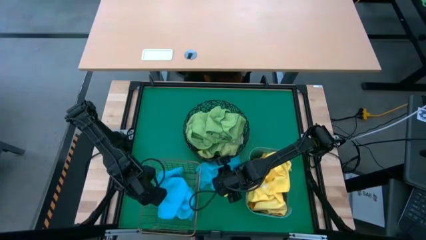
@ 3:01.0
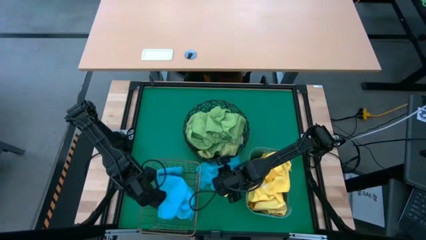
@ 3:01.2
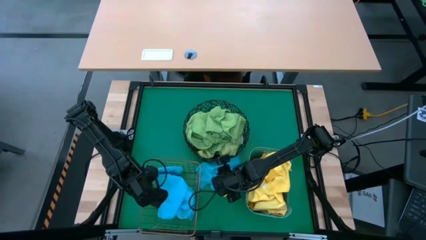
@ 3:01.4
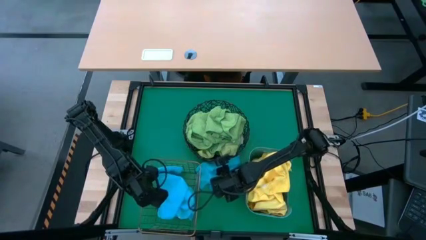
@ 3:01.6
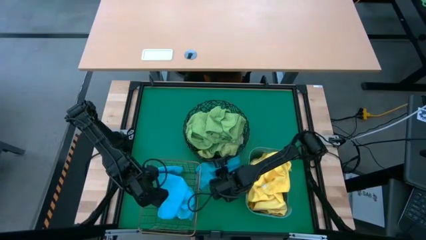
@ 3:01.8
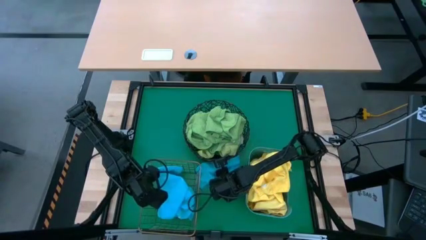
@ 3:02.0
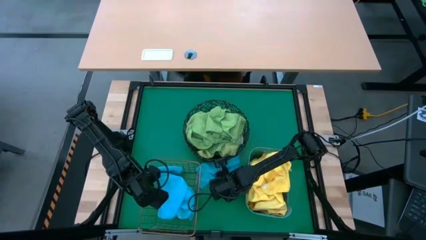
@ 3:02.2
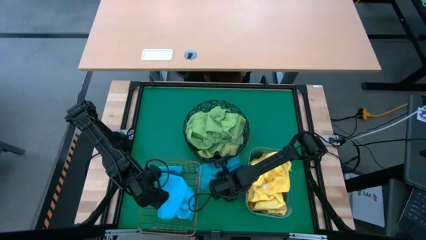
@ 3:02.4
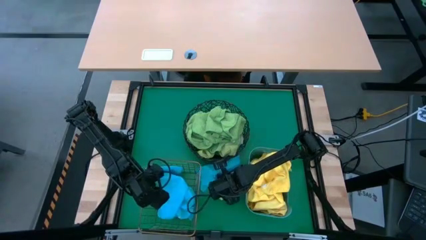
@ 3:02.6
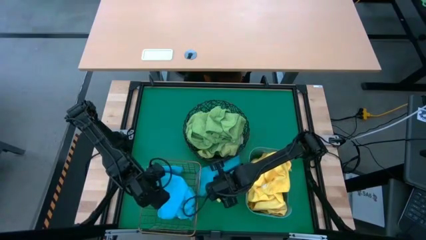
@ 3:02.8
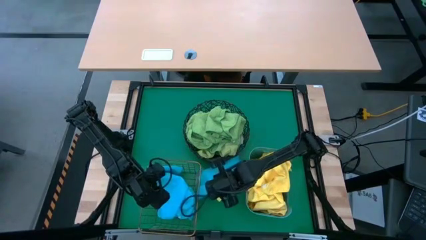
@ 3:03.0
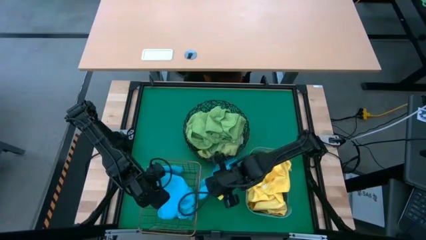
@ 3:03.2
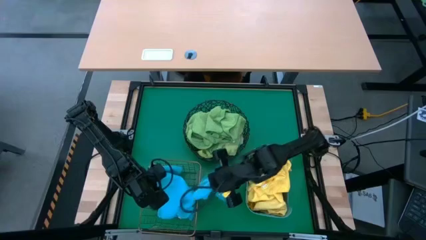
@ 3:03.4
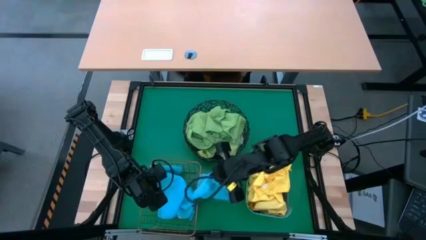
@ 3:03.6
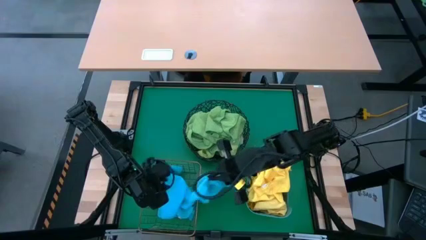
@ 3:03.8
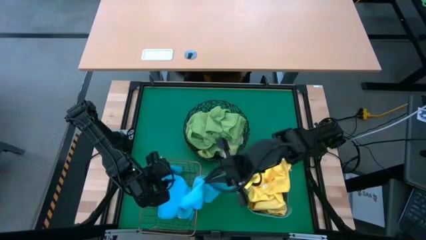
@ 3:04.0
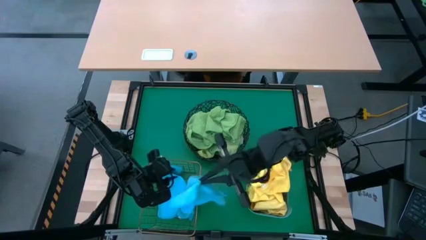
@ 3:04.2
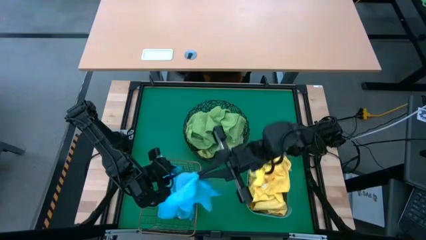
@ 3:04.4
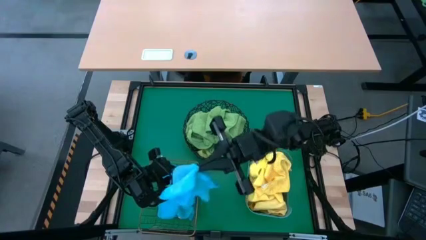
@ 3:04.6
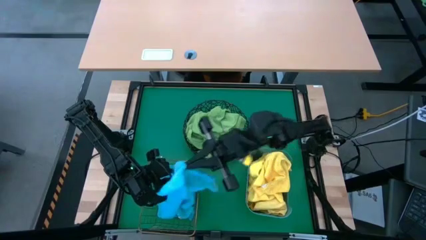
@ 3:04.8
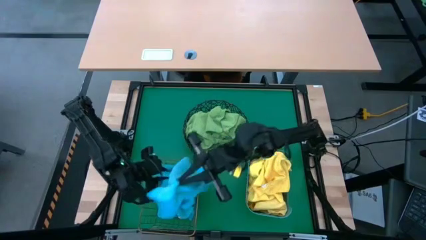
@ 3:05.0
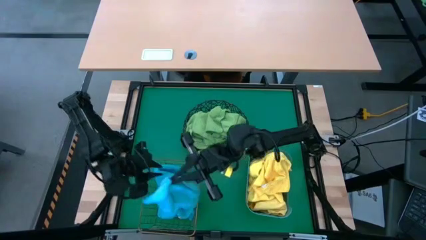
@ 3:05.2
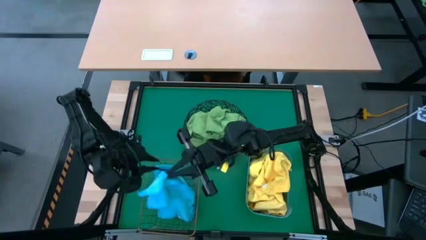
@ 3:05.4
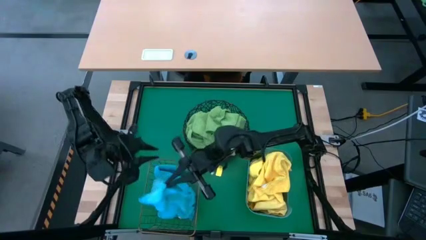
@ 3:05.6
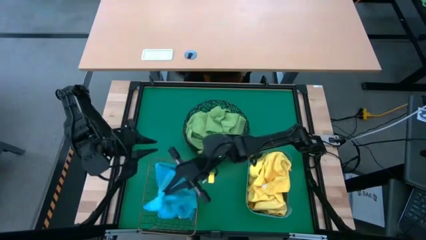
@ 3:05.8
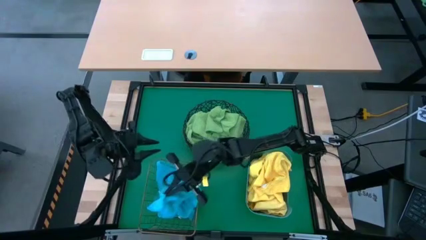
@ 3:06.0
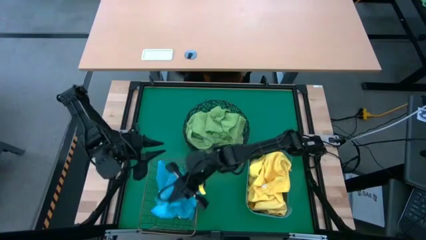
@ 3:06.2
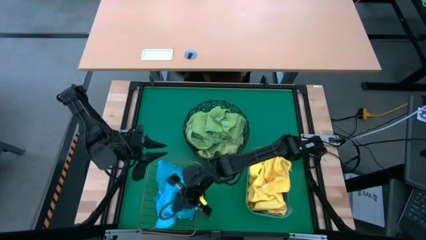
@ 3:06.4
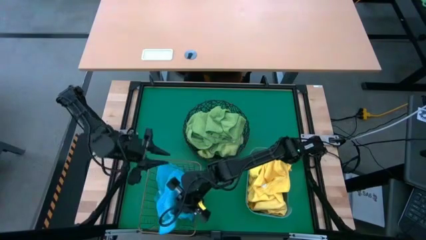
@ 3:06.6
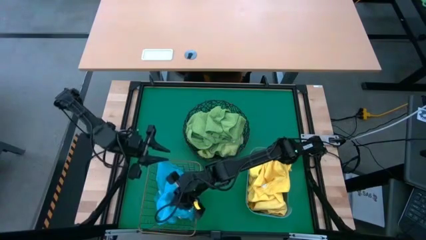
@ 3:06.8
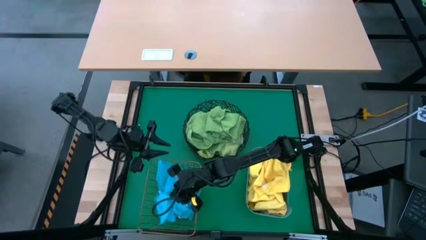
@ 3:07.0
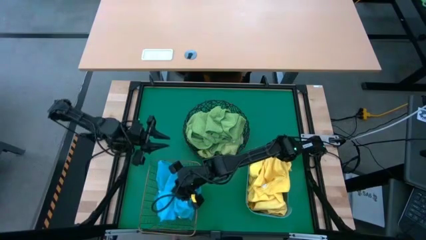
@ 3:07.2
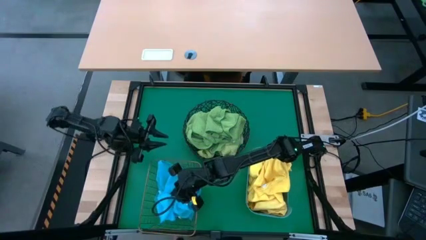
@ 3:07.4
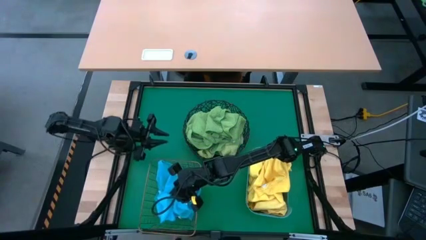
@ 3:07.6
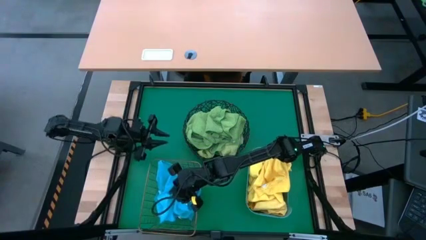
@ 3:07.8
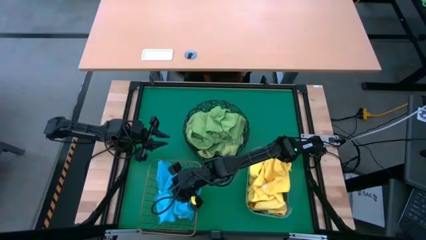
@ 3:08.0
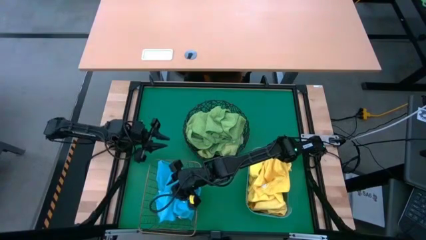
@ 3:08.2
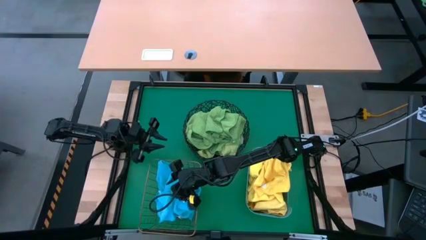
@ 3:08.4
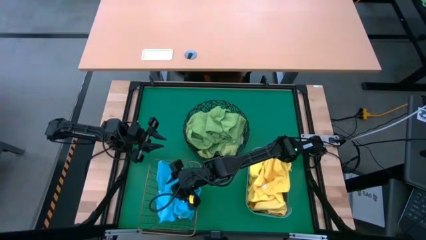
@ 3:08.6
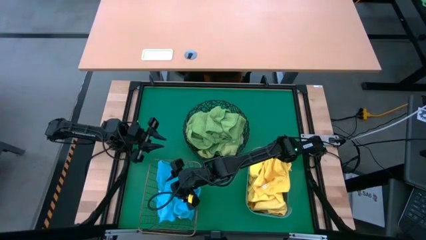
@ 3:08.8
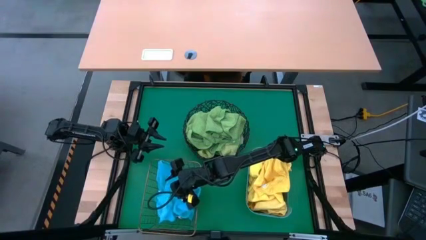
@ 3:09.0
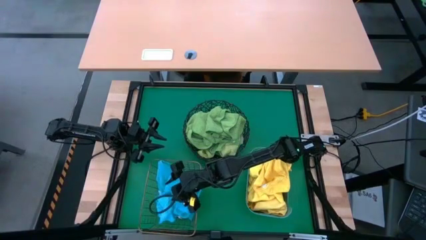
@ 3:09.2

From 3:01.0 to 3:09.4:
Task: Sort microfiber towel by color & place in baskets
Put the blue microfiber cloth into the wire basket

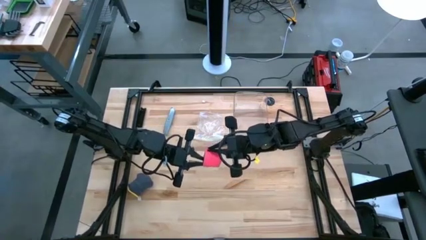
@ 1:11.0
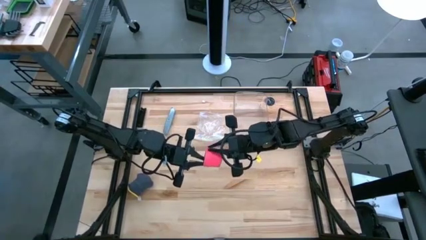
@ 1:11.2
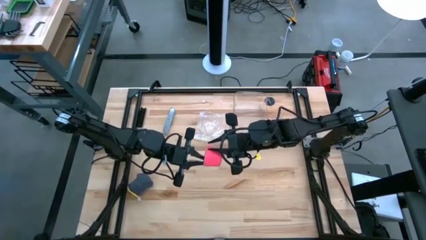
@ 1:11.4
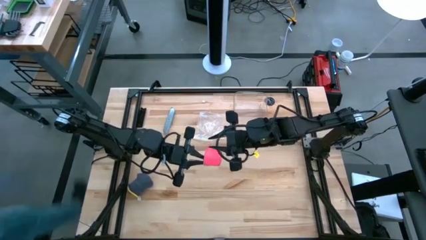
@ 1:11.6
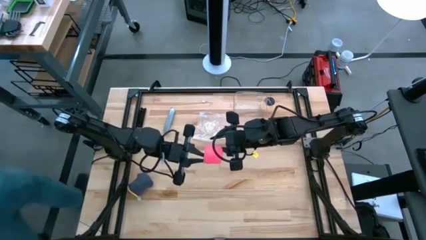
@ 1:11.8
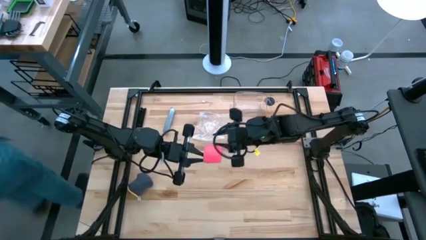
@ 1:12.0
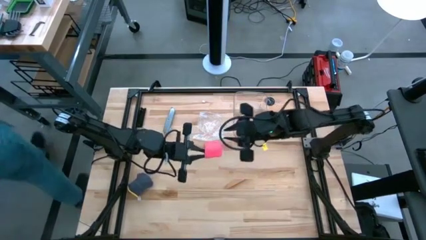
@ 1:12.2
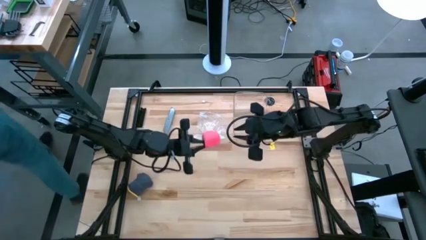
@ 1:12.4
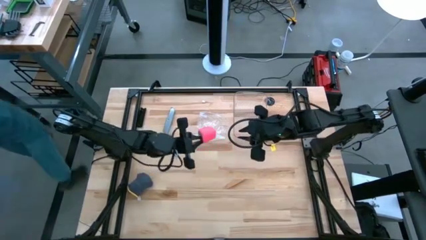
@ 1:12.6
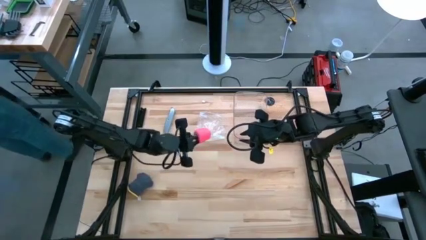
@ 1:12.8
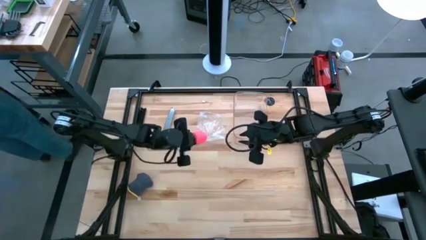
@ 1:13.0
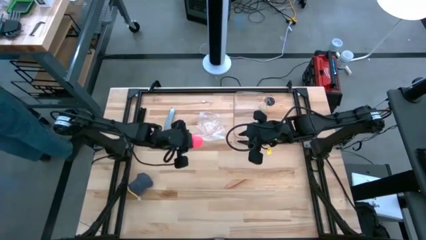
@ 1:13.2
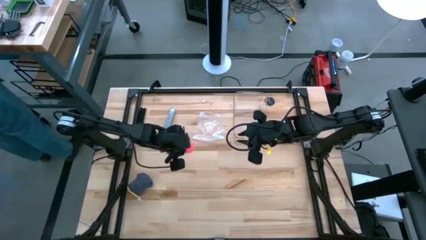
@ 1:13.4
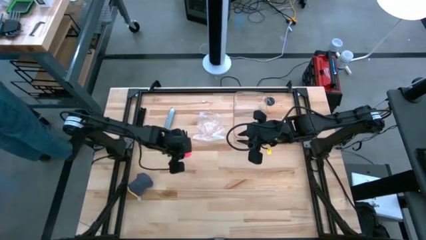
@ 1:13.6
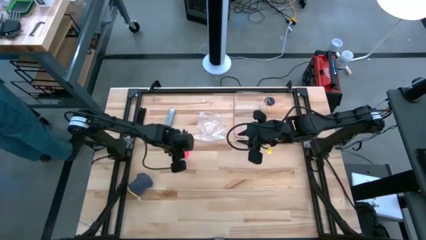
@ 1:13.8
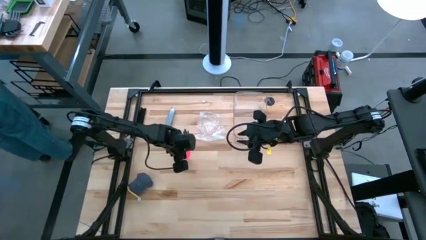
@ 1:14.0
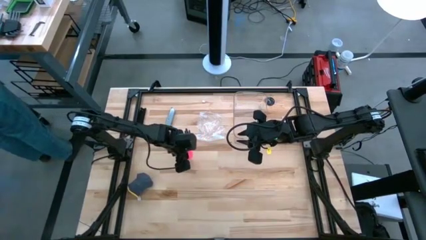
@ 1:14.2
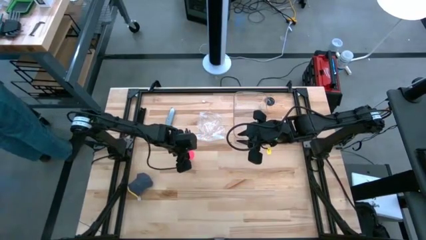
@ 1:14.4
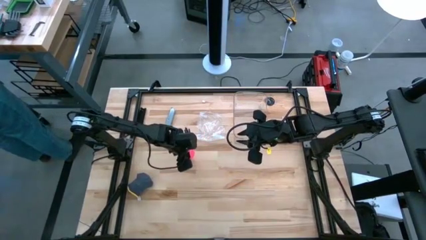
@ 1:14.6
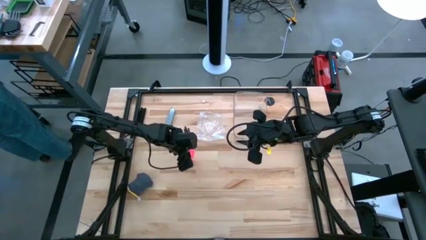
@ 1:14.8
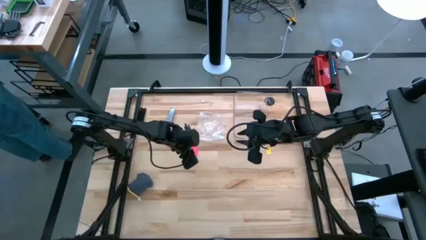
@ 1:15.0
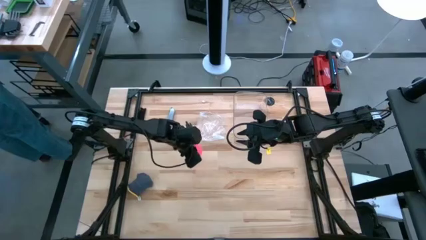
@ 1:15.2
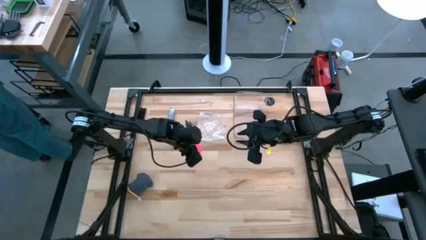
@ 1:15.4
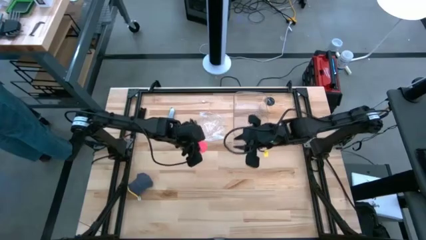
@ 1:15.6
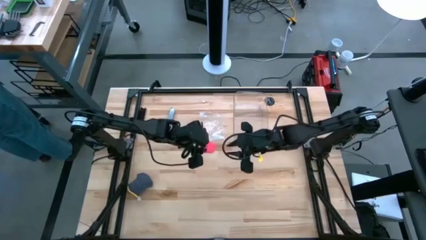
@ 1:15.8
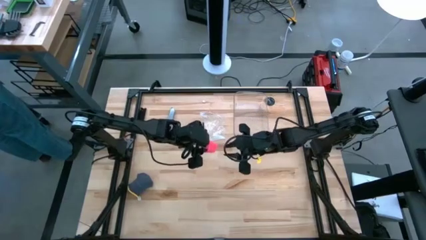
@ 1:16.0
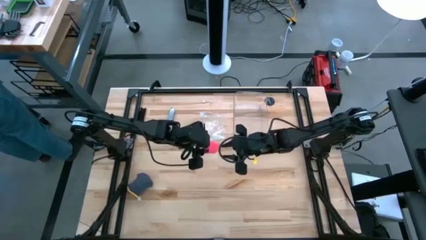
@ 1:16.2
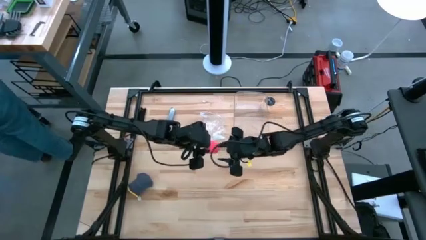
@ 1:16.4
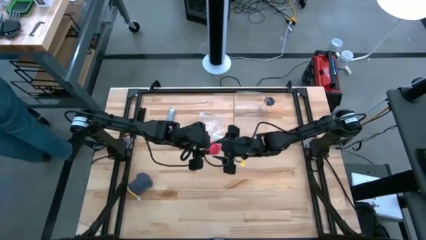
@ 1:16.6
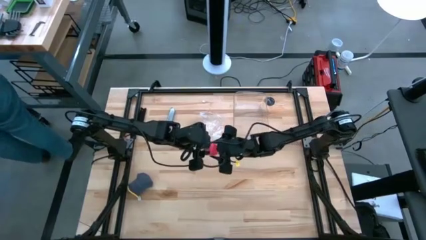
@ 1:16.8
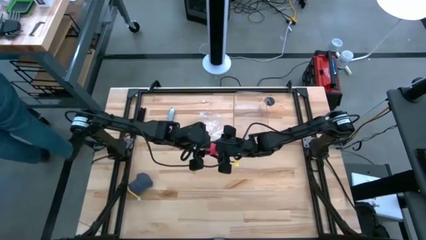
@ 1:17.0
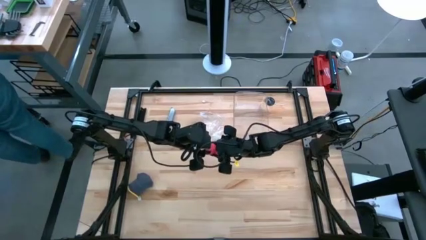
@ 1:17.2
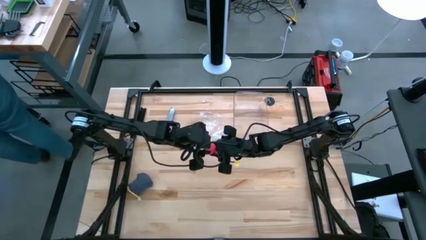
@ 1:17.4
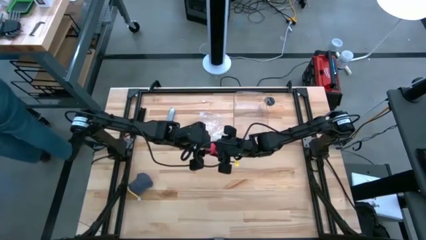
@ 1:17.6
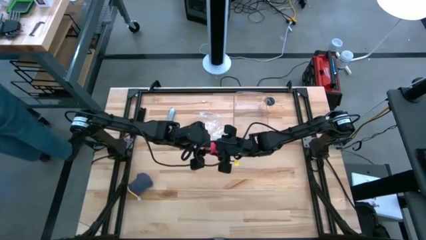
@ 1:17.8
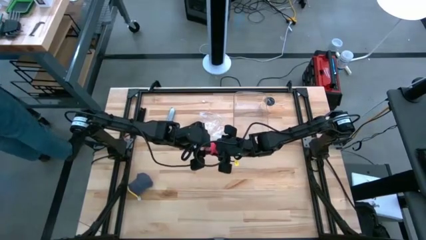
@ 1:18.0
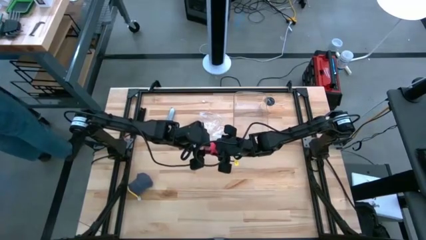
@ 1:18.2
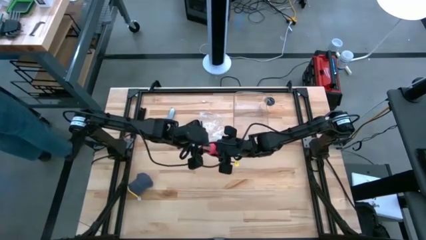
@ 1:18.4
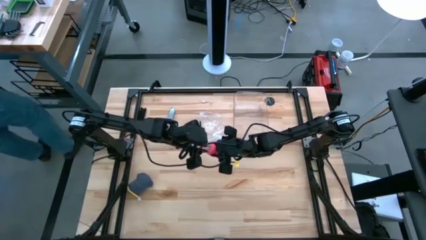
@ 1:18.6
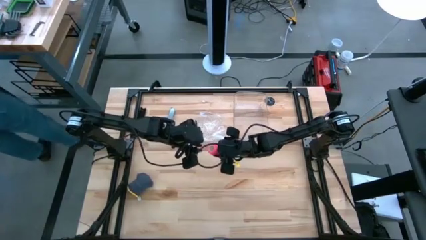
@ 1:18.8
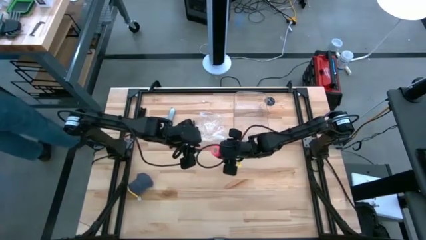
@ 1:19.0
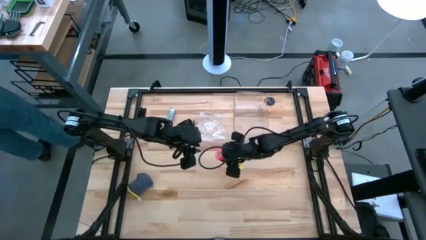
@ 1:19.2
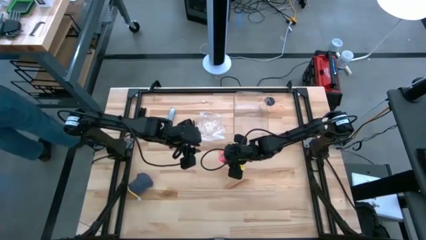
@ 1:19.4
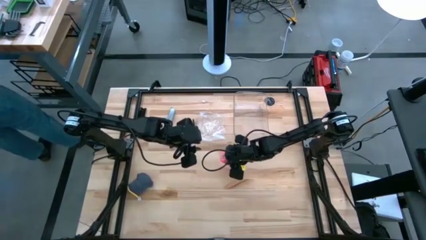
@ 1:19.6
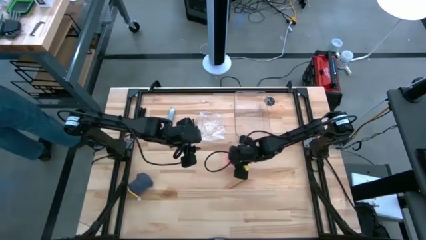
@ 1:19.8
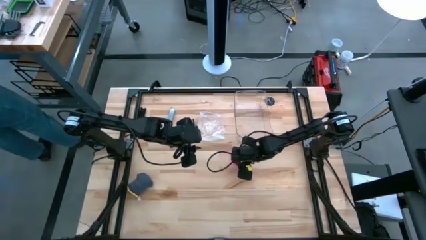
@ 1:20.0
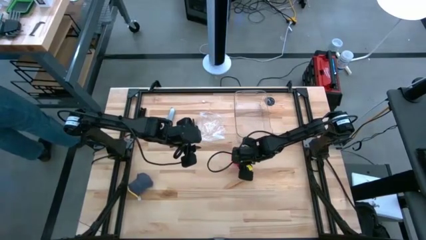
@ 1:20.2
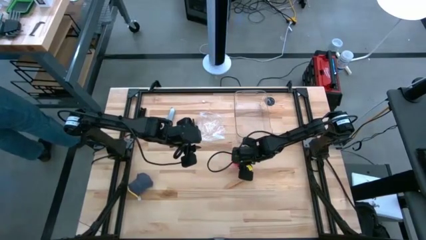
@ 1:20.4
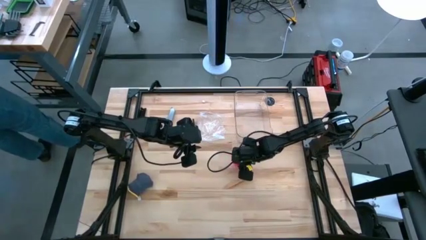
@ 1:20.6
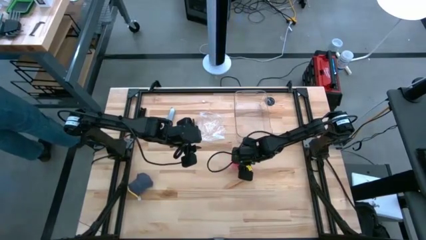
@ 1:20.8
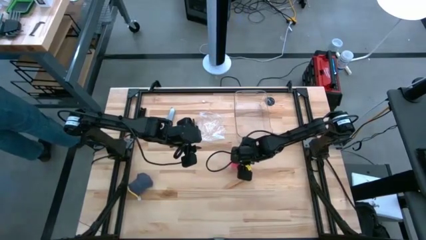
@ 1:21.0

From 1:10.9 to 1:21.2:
Task: Roll bandage
Roll the pink bandage
